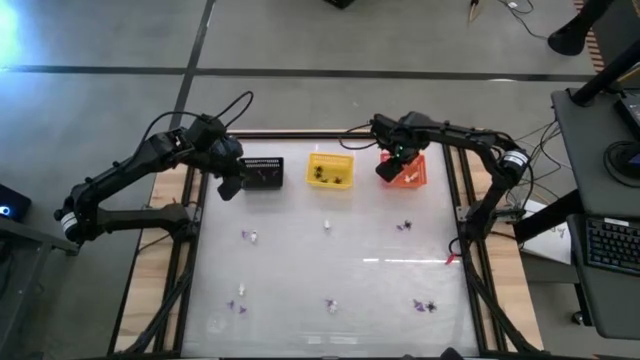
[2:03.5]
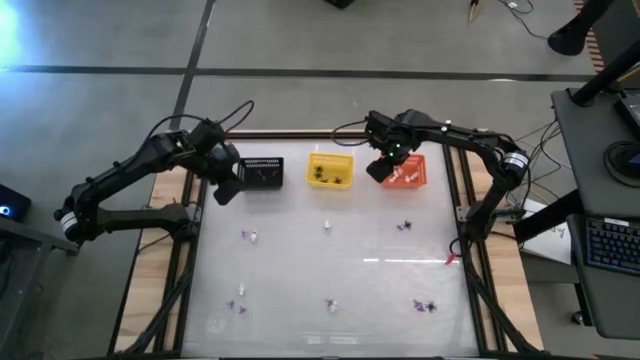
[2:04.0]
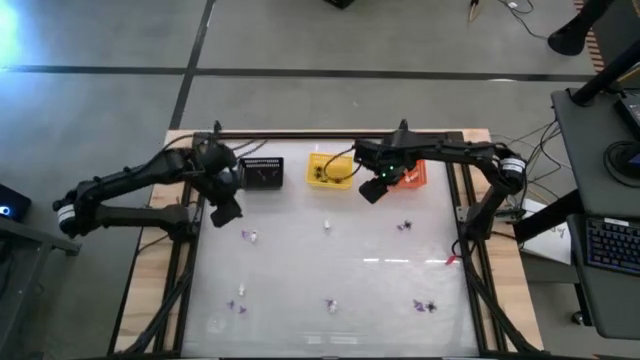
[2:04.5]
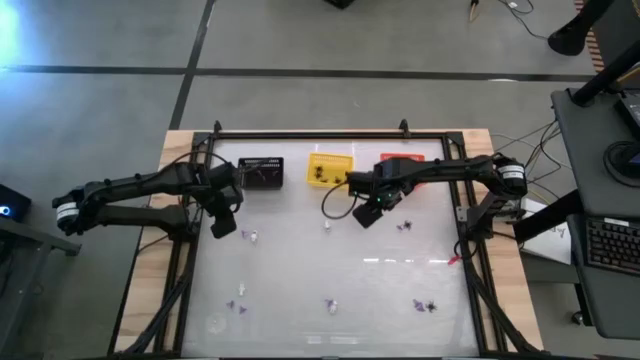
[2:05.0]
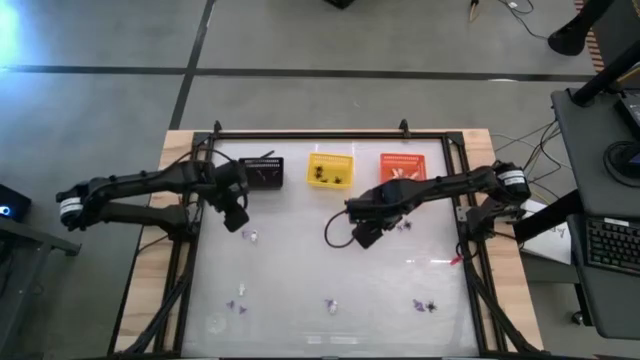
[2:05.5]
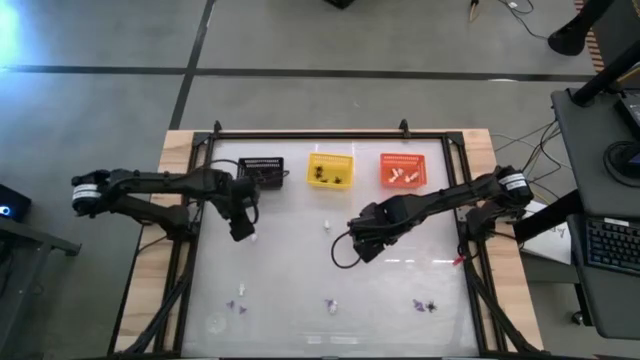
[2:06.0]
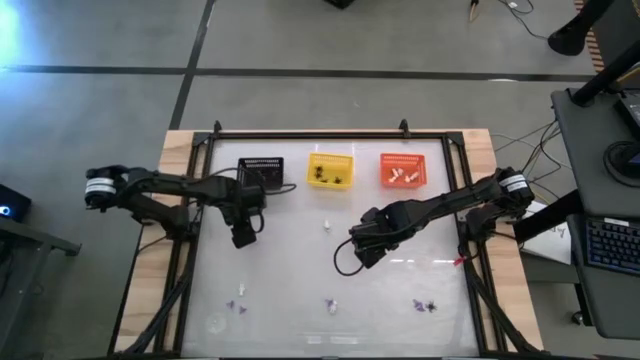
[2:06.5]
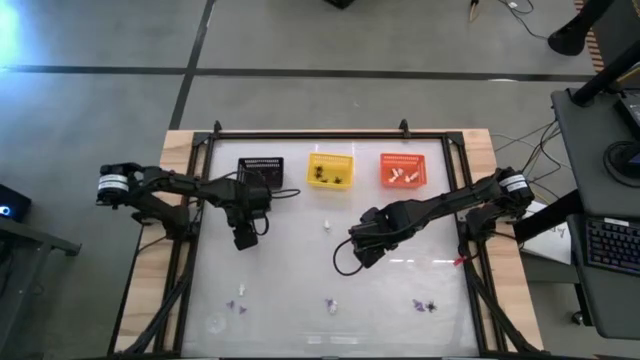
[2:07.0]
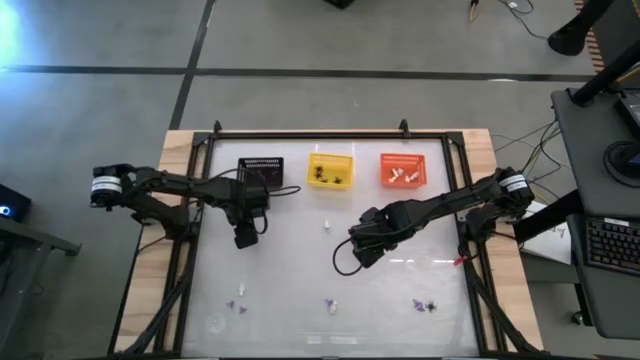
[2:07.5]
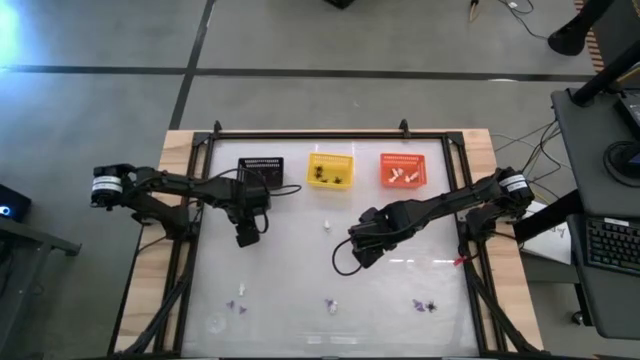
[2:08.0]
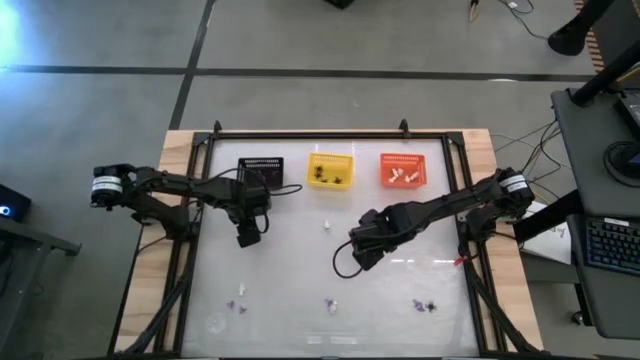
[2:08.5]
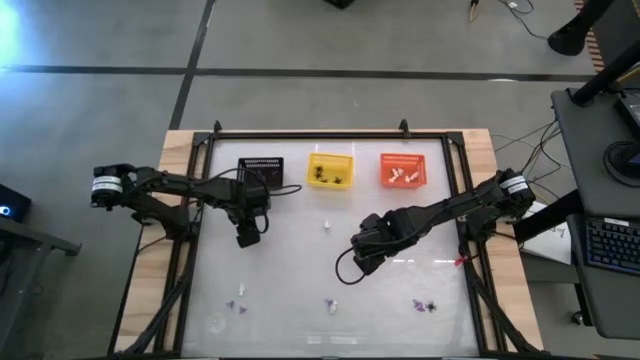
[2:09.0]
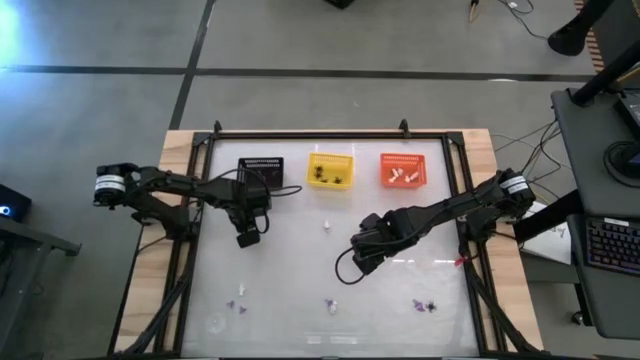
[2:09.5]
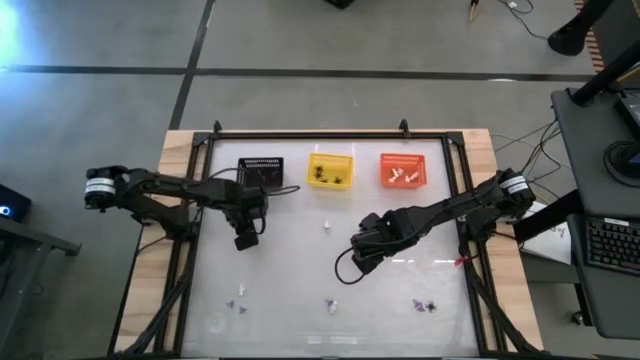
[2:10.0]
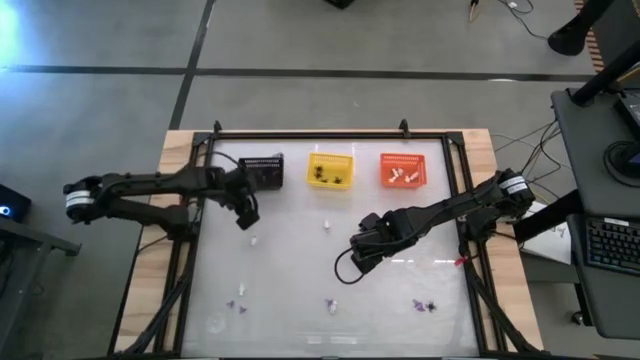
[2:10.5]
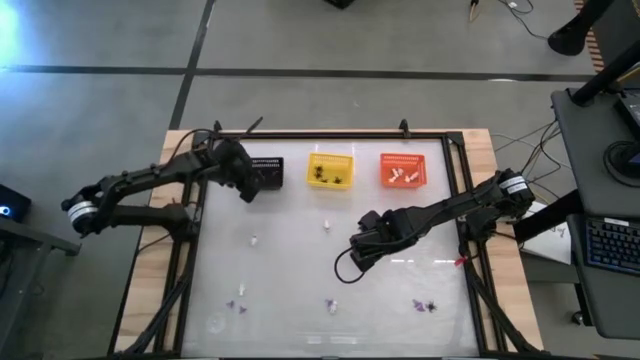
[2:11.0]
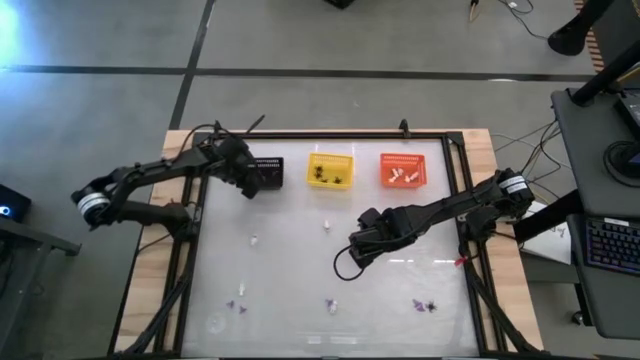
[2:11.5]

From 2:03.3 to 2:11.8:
Task: Sort Halloween decoration
Put the violet hat toy into the black bin

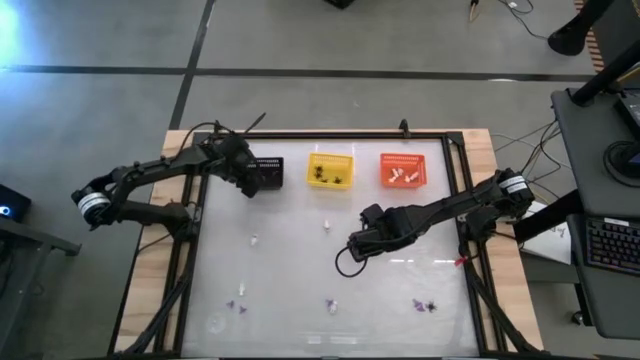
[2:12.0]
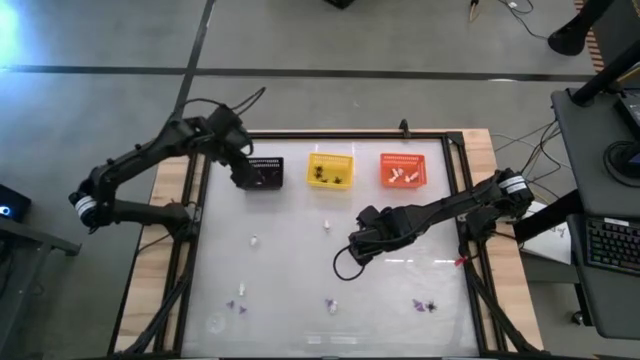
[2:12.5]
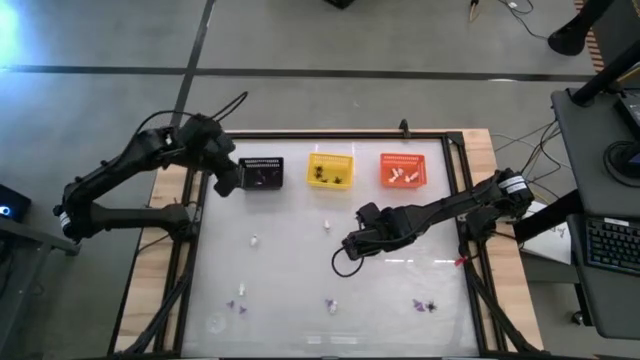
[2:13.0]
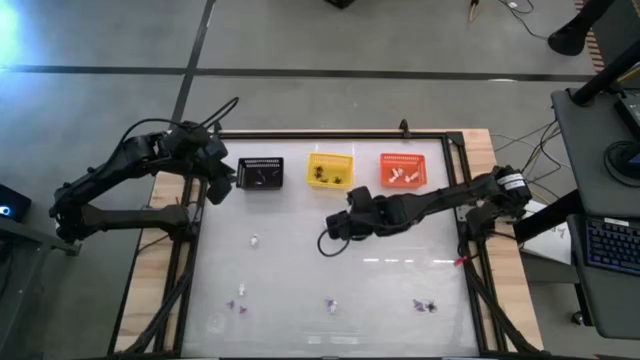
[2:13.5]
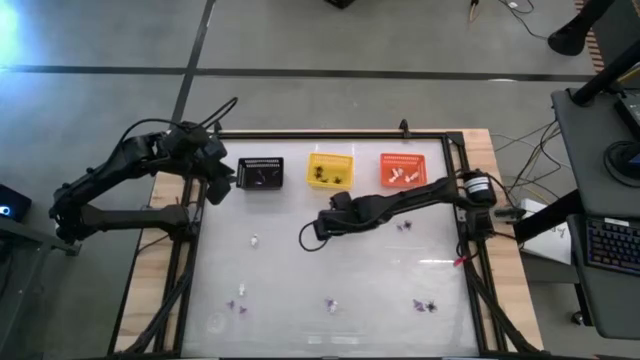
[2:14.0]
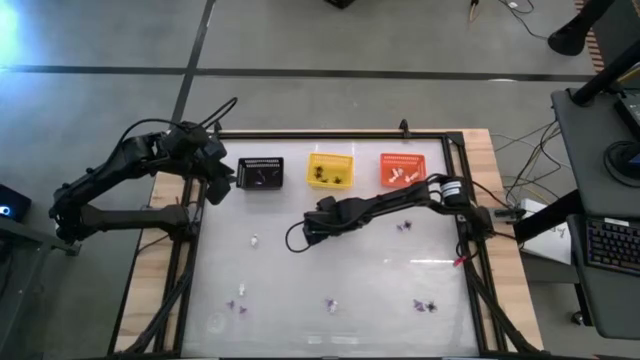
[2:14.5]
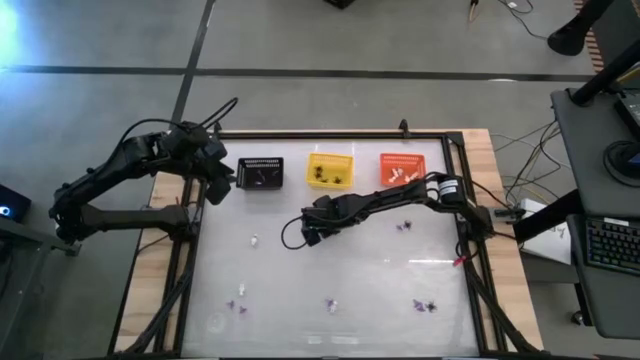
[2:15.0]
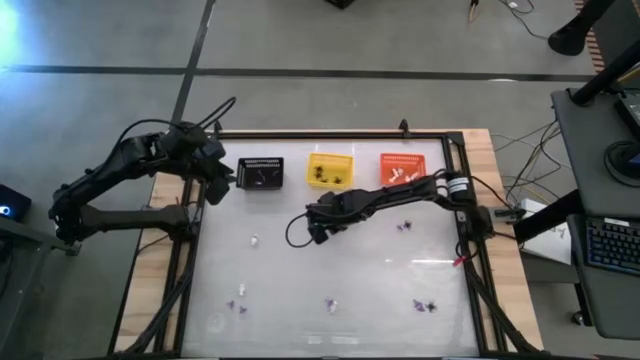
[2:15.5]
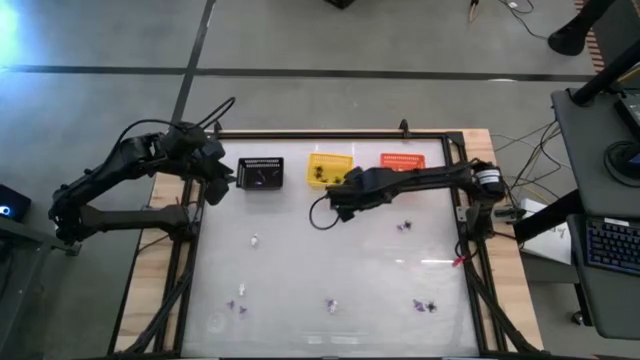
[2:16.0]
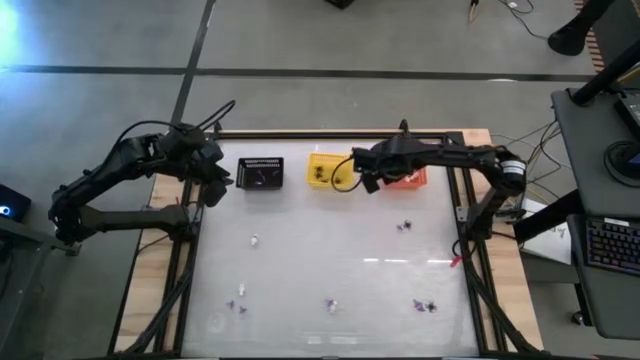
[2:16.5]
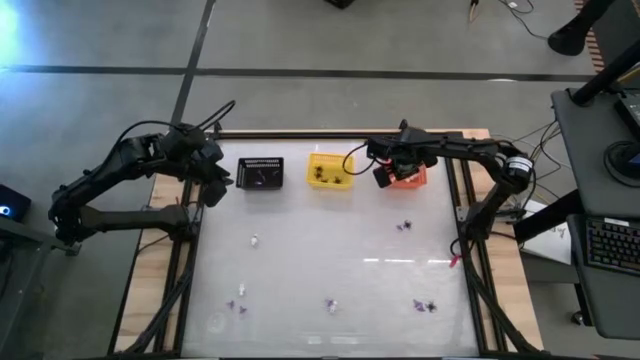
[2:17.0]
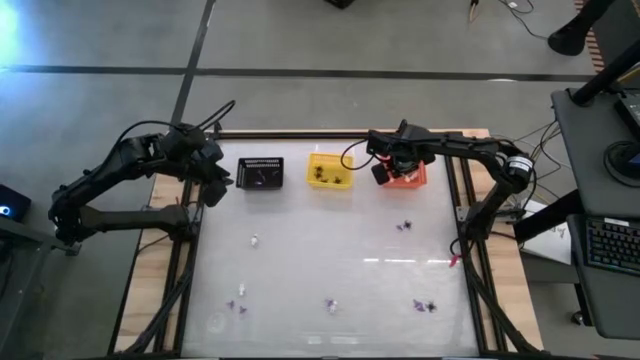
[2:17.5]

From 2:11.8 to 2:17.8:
Put the white skeleton toy into the orange bin

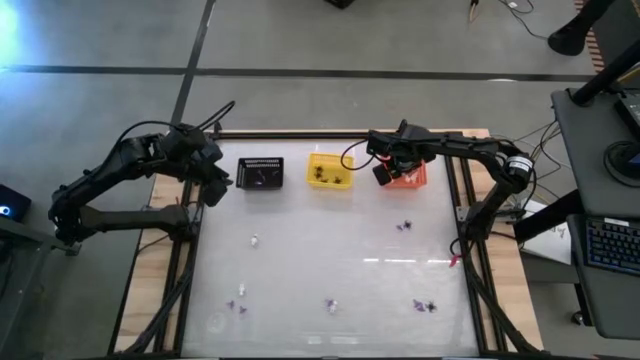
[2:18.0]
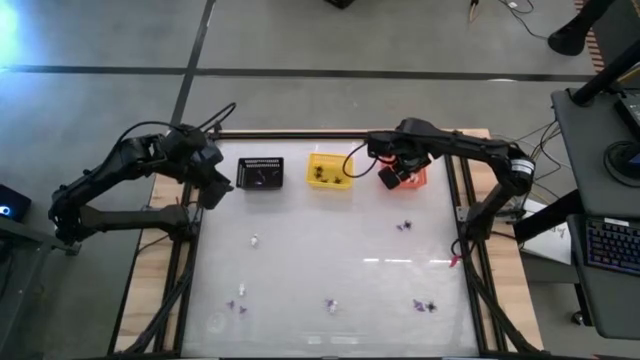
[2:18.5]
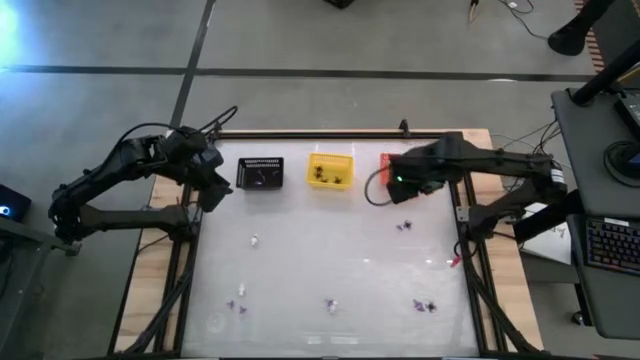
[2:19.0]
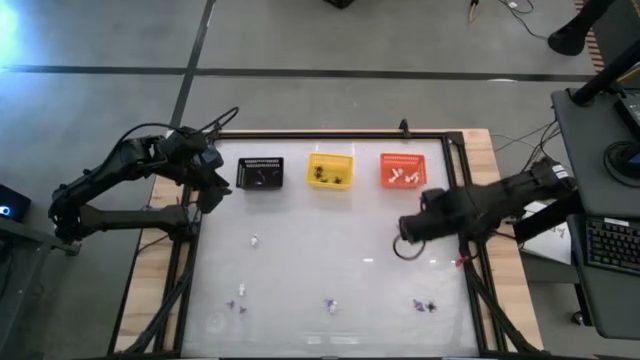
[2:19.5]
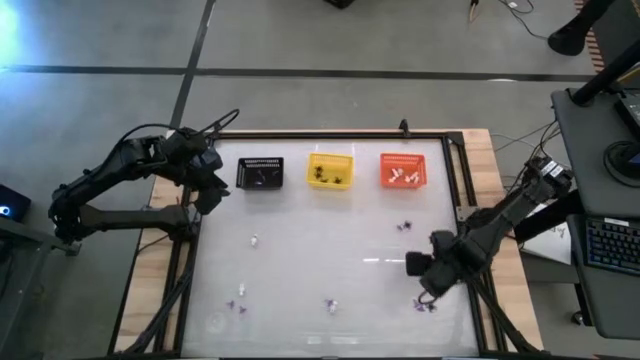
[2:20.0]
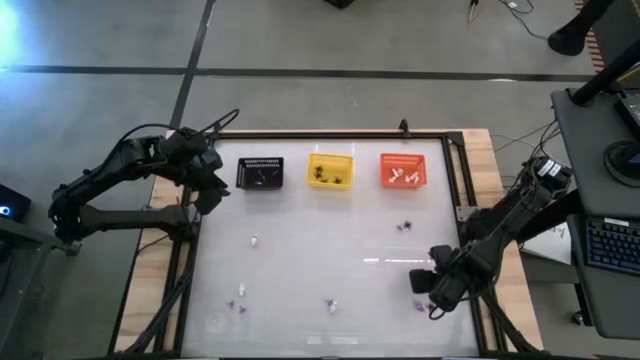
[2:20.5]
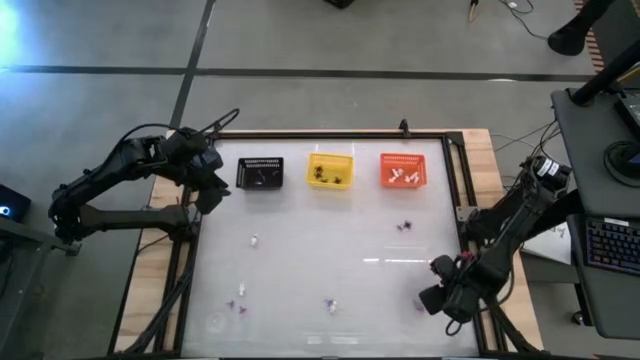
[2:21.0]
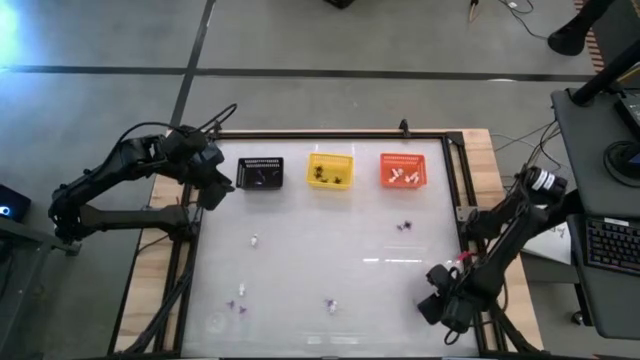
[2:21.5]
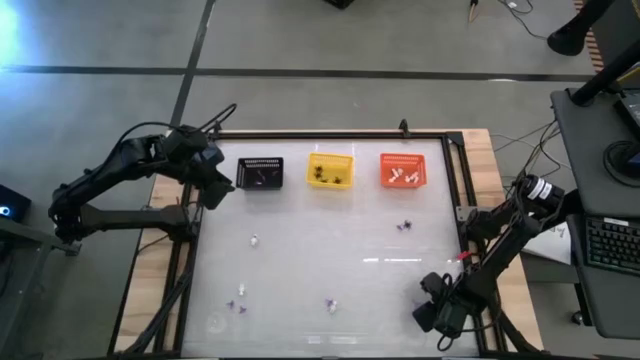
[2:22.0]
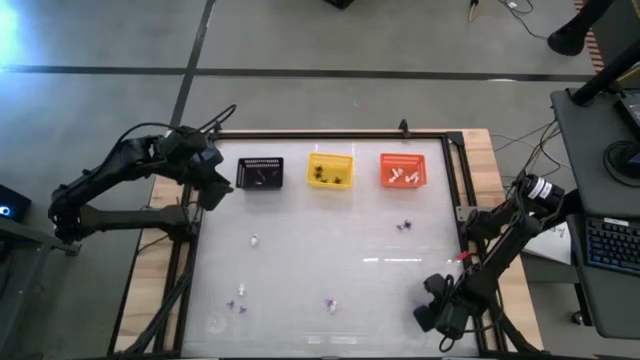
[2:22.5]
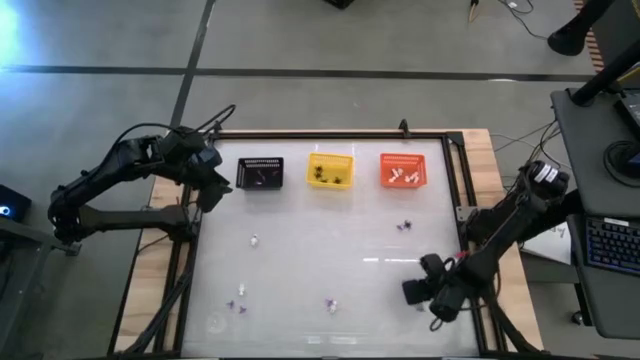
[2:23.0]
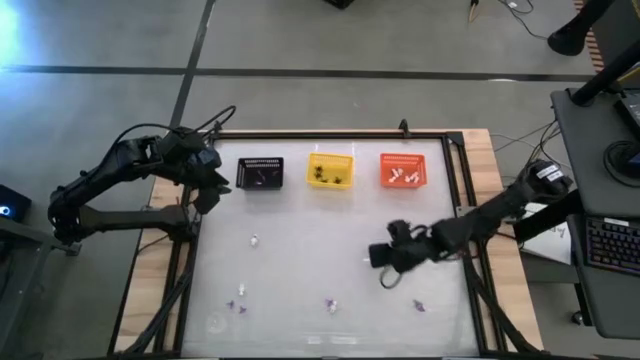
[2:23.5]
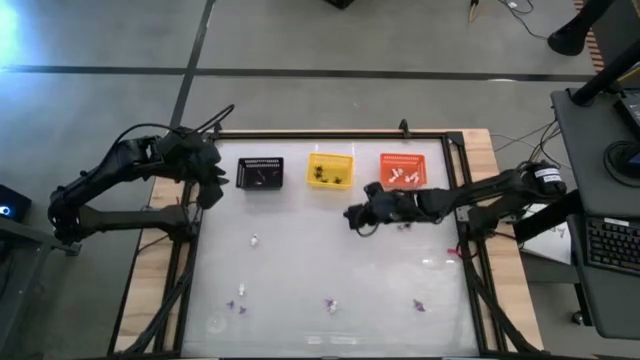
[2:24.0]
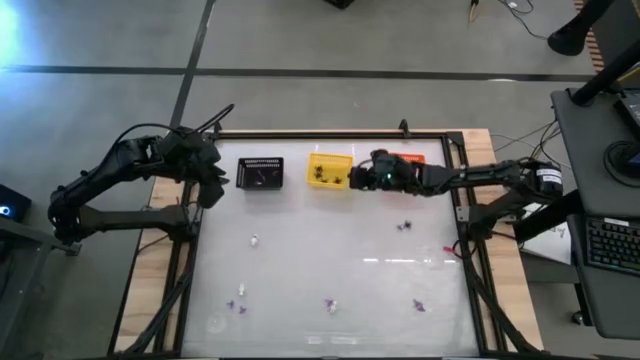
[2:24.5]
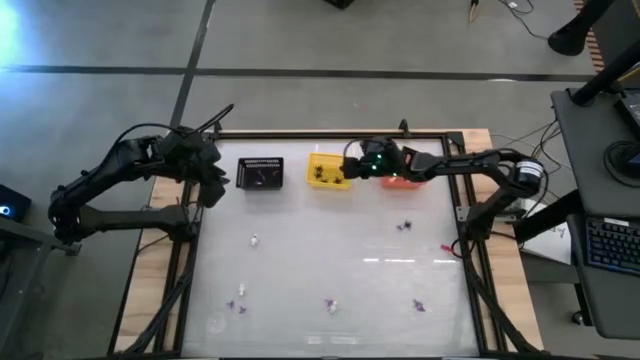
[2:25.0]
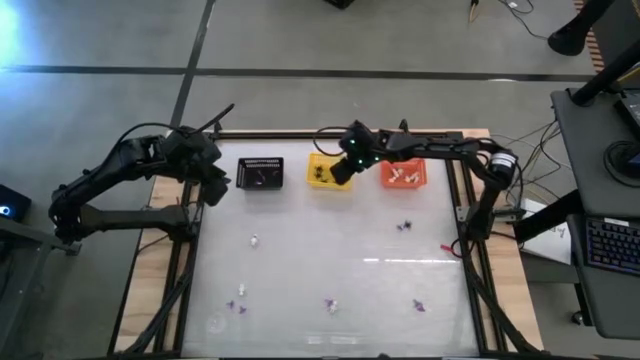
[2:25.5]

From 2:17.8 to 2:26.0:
Put the black spider toy into the yellow bin
